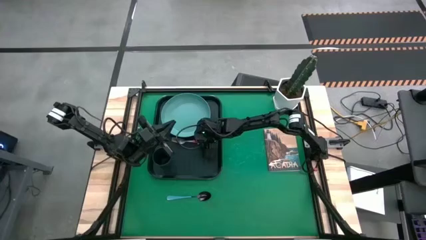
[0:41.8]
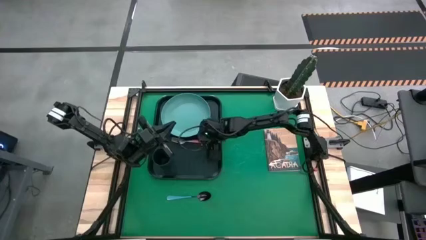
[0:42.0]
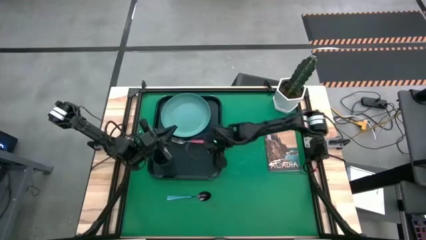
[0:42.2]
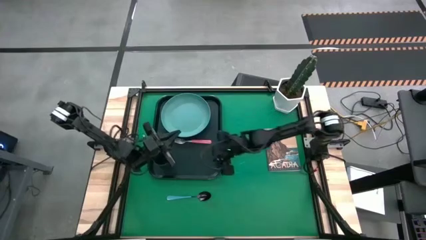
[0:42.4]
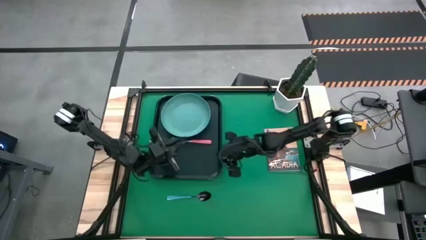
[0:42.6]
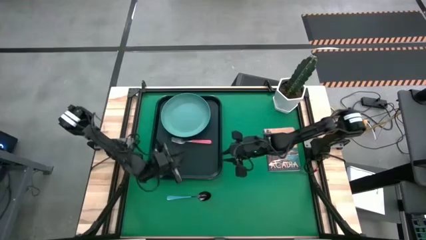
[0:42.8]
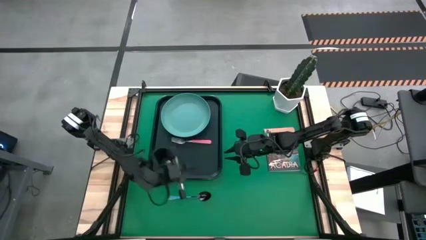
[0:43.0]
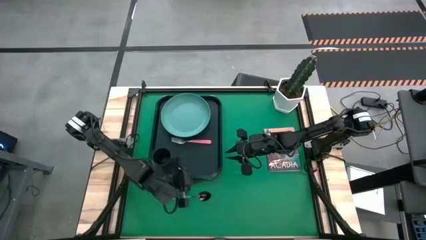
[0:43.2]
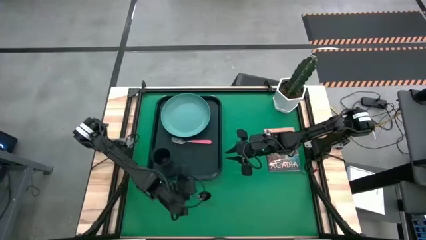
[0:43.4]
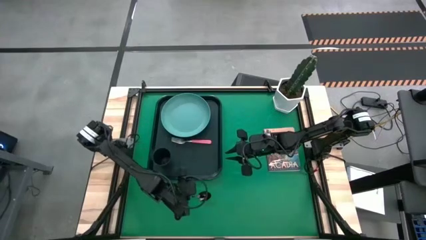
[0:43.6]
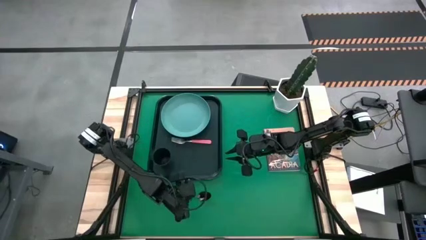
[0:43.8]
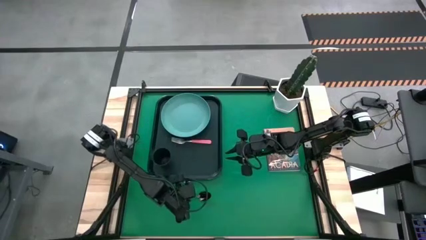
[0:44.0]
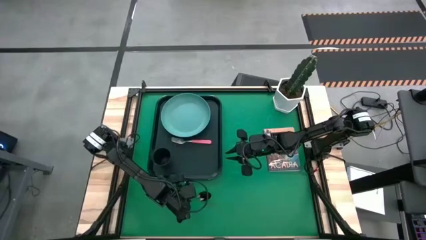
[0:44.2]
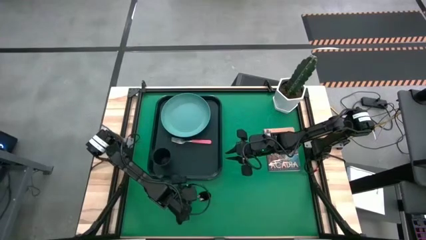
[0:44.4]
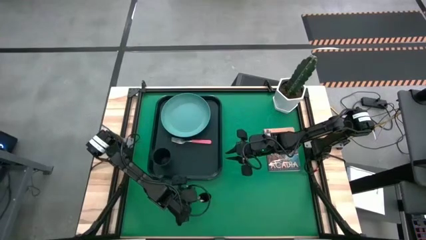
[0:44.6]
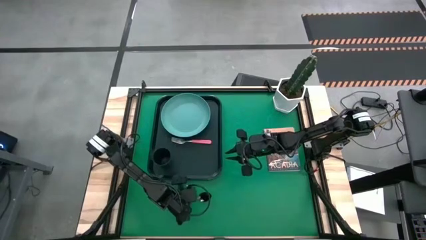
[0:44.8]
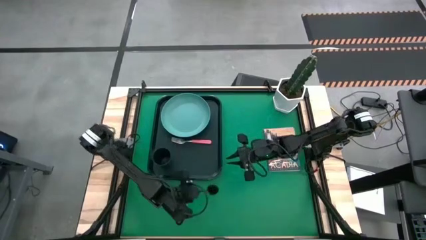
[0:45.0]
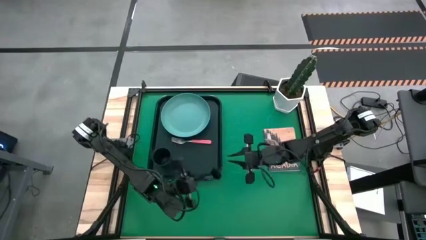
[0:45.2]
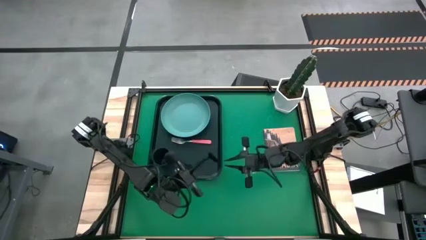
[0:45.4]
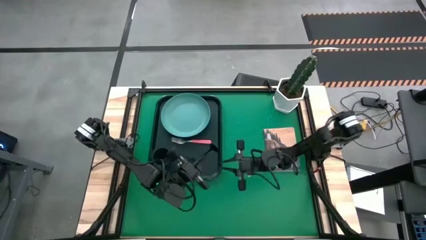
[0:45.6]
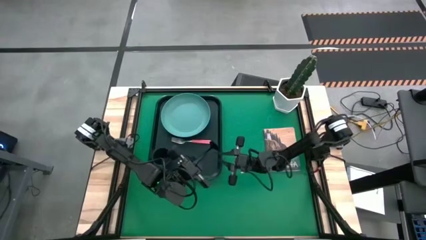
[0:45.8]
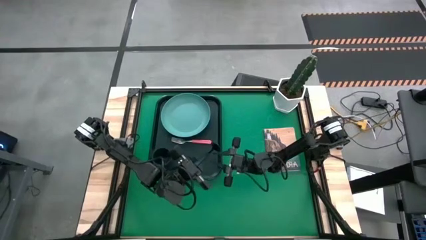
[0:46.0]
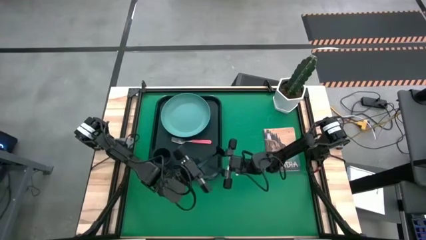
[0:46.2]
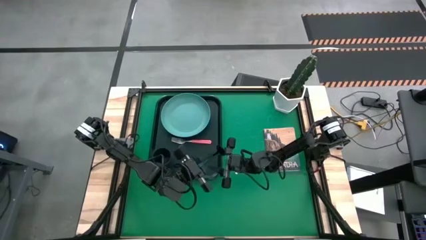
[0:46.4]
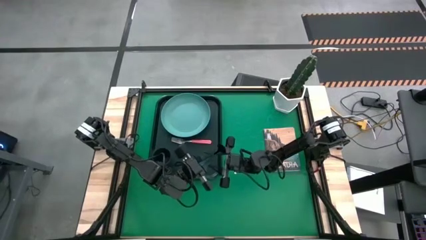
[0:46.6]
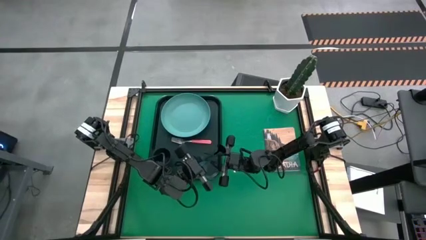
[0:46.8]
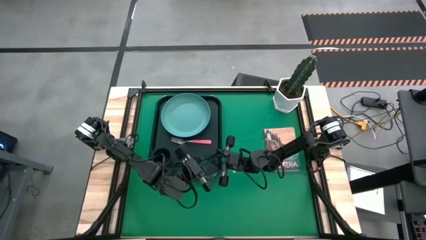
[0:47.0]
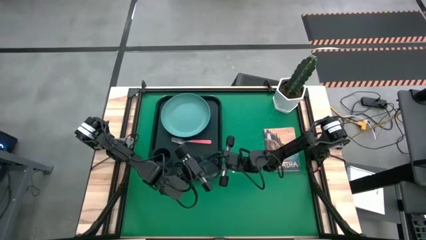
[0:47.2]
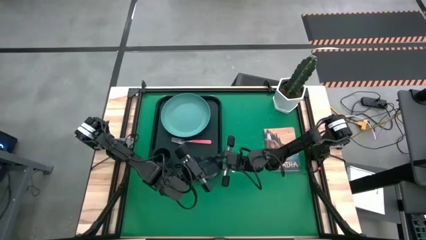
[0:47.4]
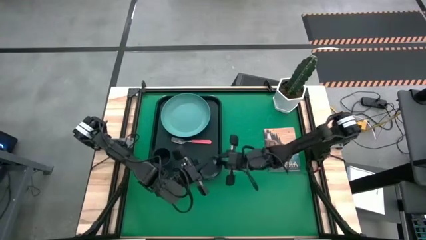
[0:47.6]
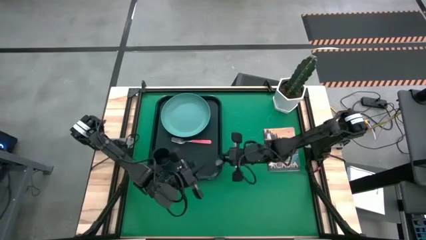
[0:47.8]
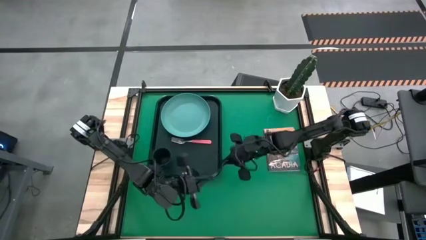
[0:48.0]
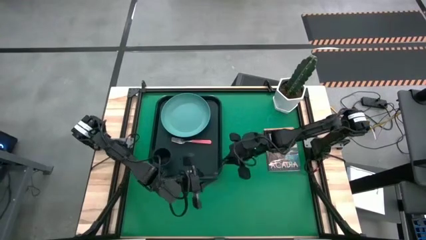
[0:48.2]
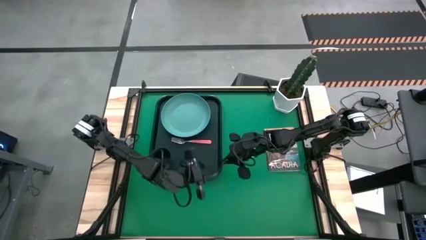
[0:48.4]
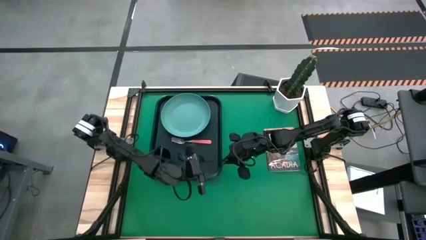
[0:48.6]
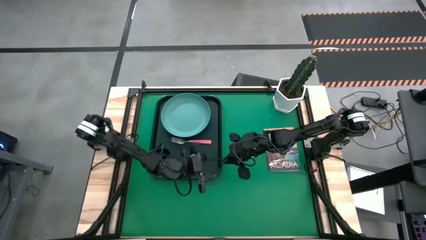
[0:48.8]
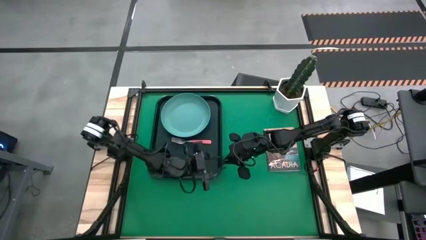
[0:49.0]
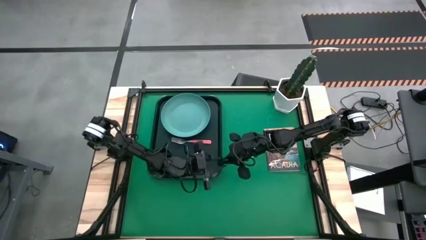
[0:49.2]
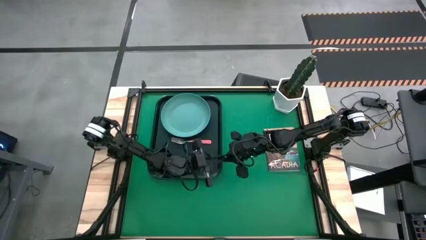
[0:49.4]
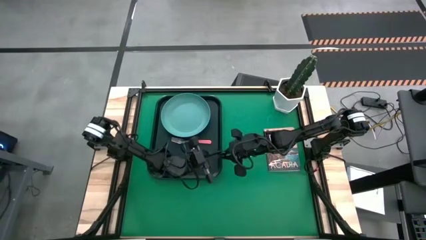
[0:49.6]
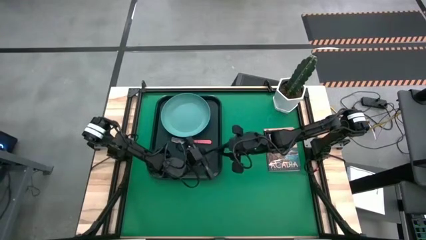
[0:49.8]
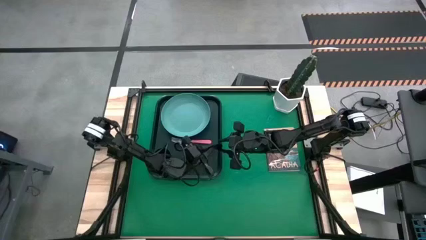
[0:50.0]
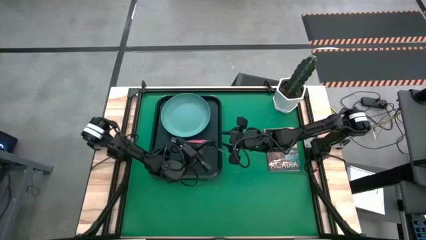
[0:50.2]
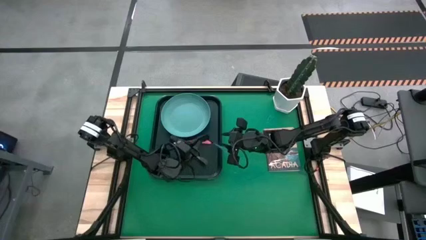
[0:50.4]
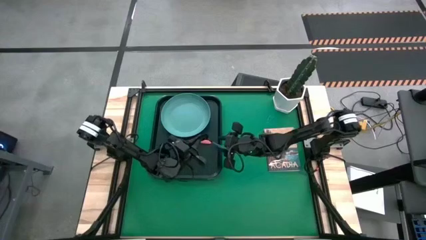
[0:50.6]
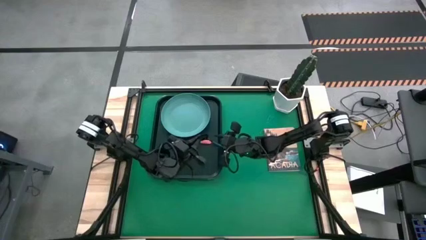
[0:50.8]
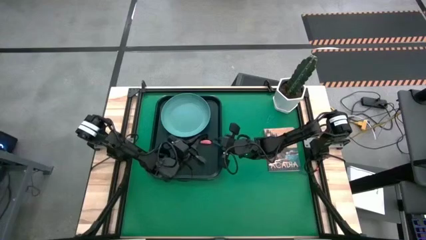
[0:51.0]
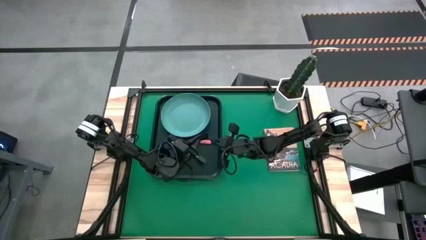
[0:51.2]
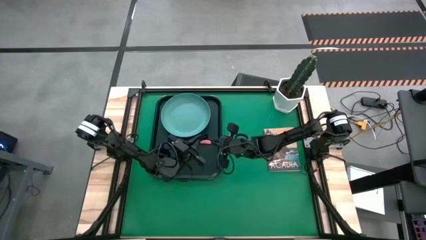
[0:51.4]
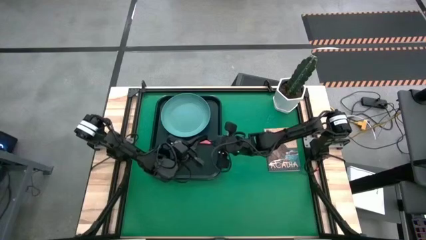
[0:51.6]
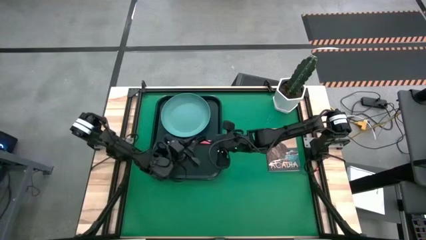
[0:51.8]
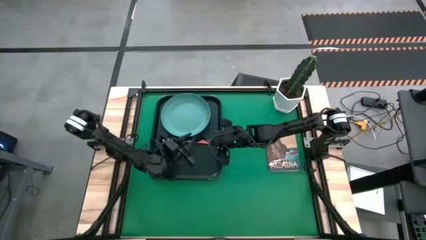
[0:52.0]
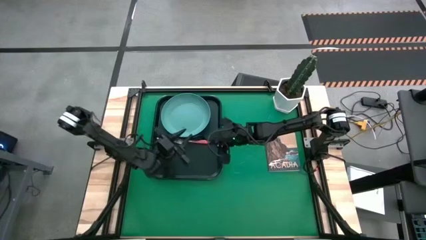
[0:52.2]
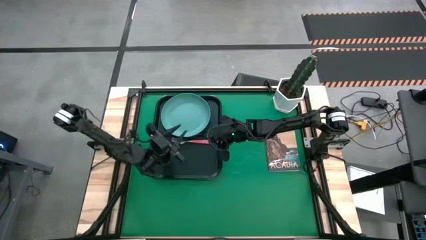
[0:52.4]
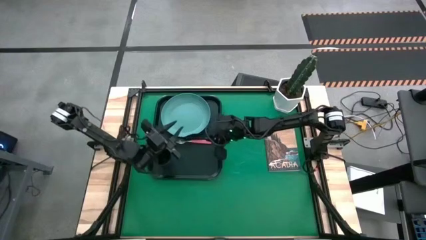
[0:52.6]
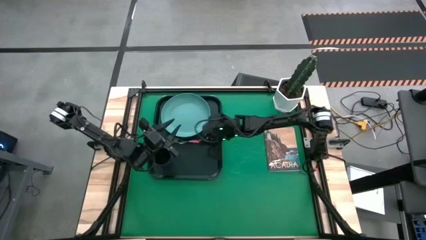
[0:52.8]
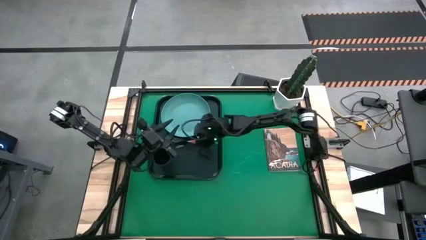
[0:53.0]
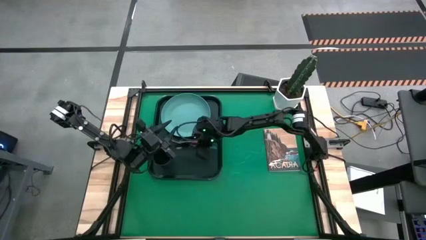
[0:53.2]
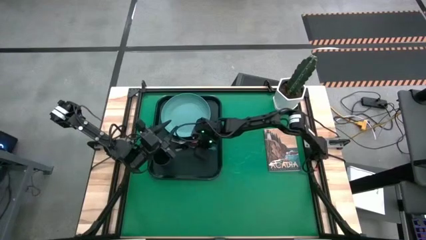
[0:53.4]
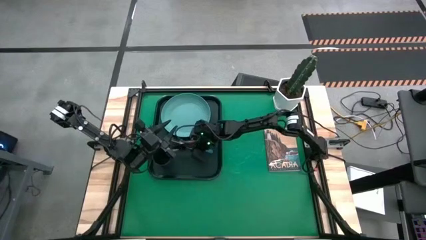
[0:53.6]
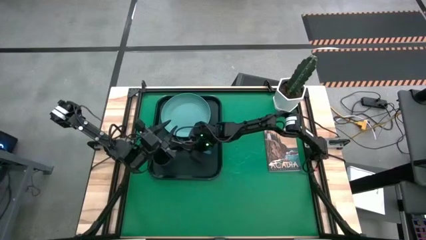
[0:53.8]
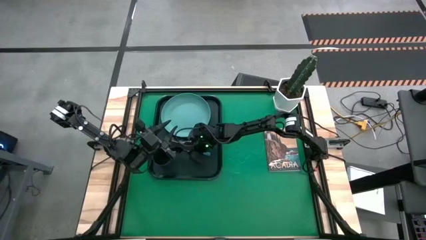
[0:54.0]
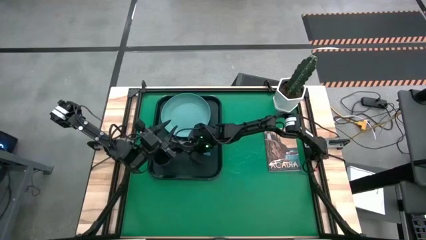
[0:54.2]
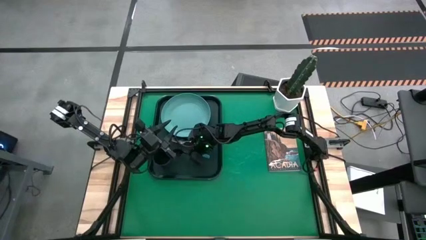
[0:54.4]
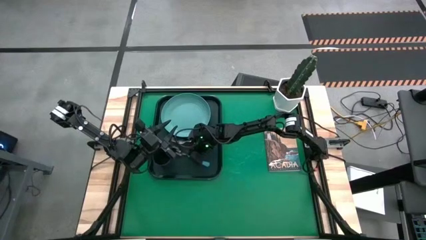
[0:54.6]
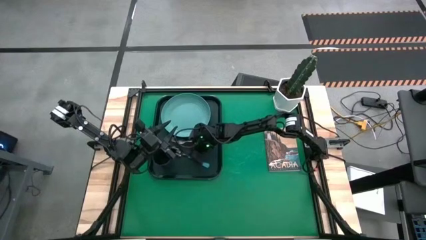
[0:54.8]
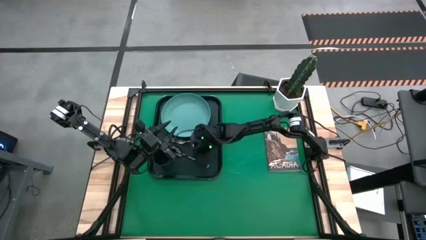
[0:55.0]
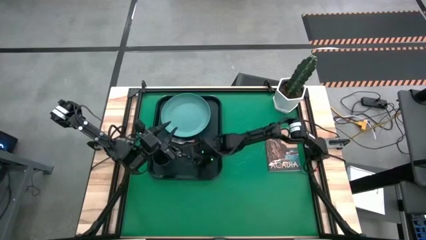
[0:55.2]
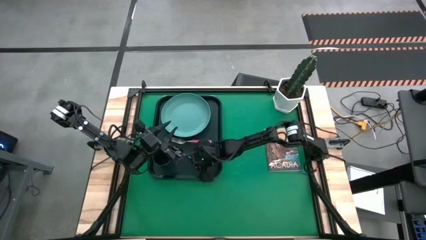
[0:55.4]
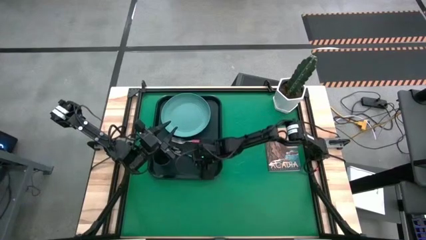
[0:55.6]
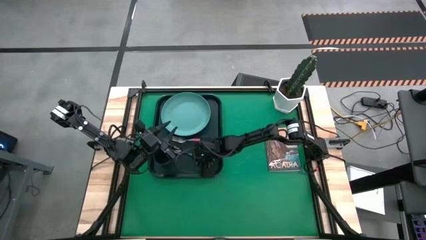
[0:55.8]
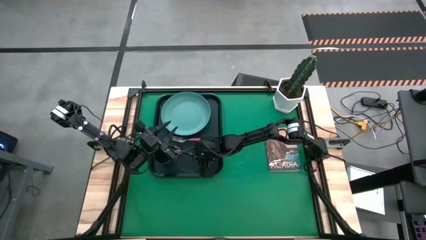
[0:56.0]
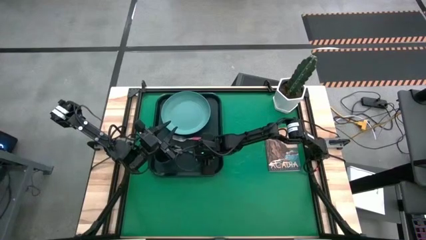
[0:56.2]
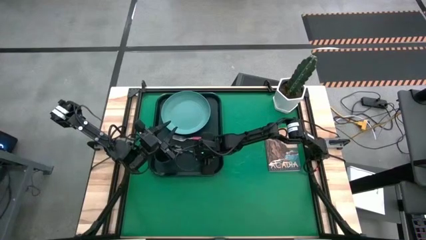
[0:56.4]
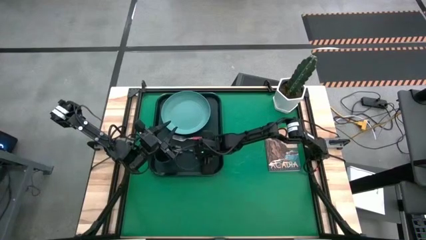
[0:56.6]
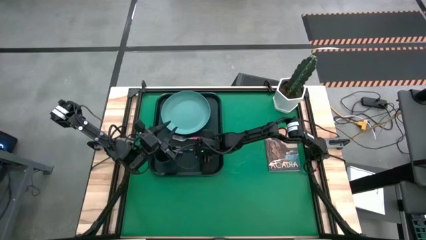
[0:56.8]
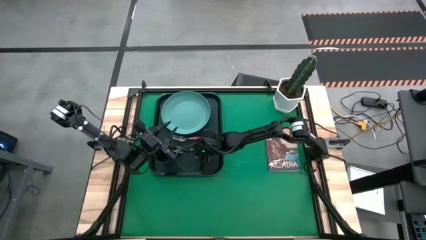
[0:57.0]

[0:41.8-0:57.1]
Task: Pick and place plate/cup/fork/spoon on tray
Put the blue spoon on the black serving tray below the pink fork
